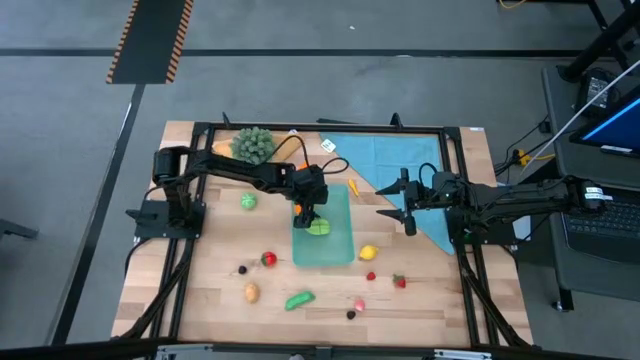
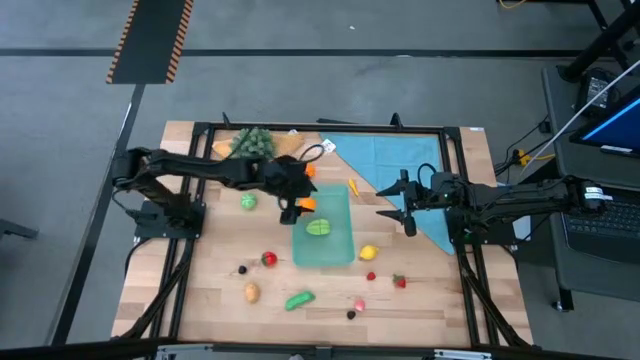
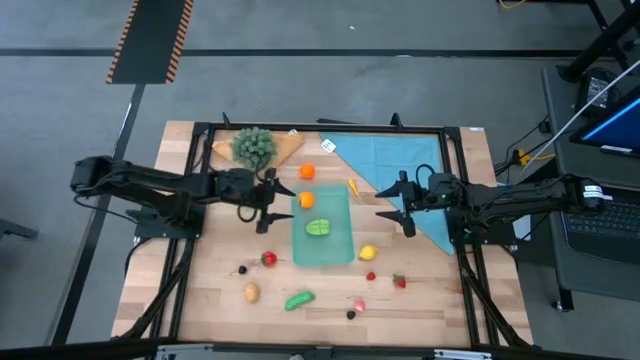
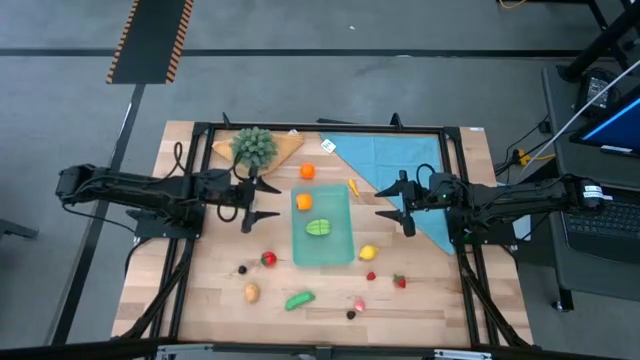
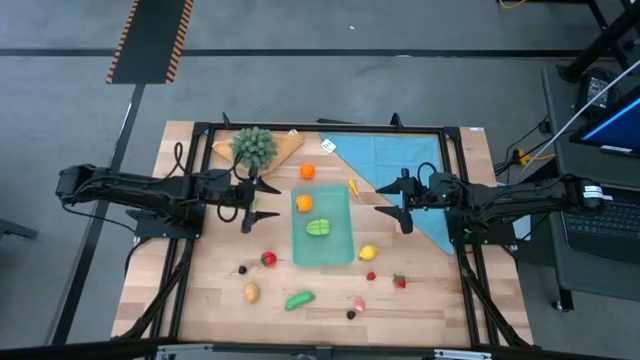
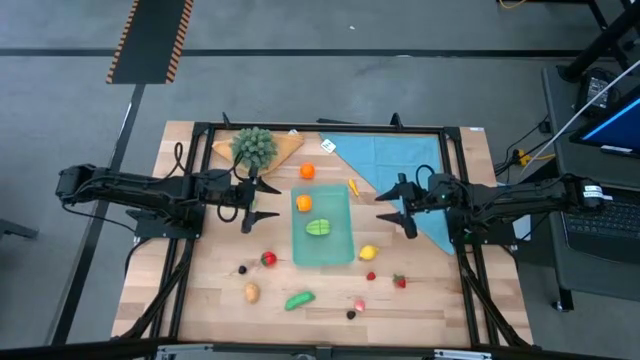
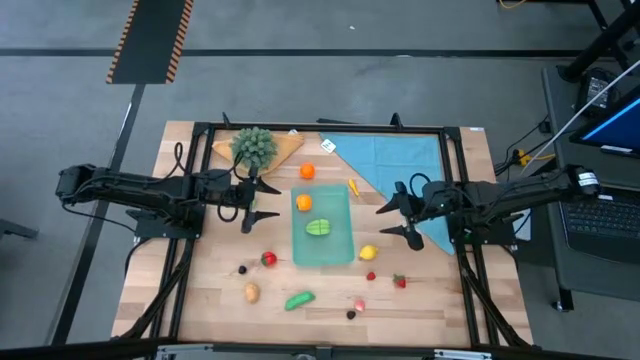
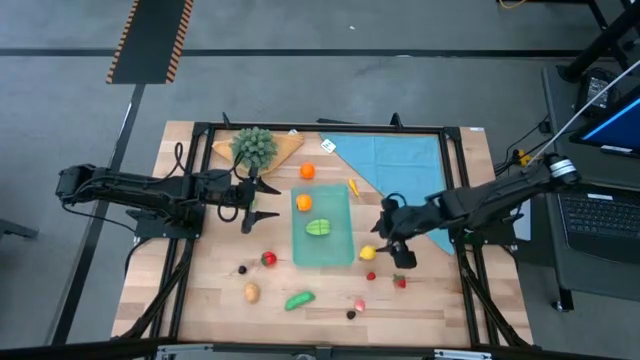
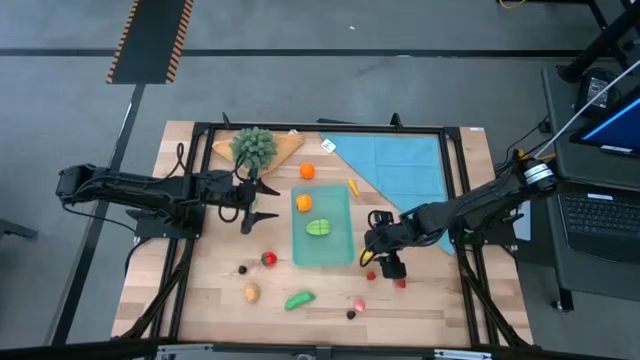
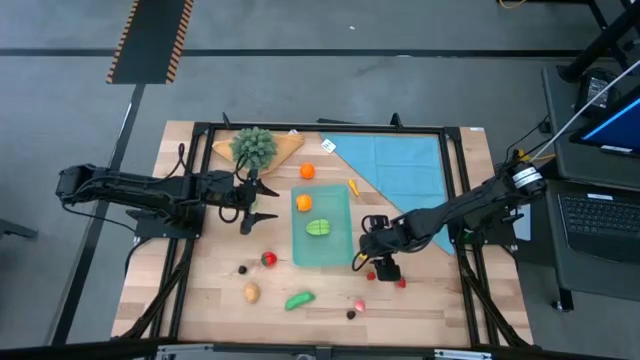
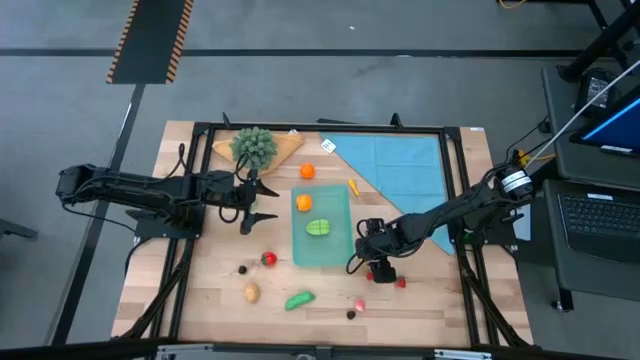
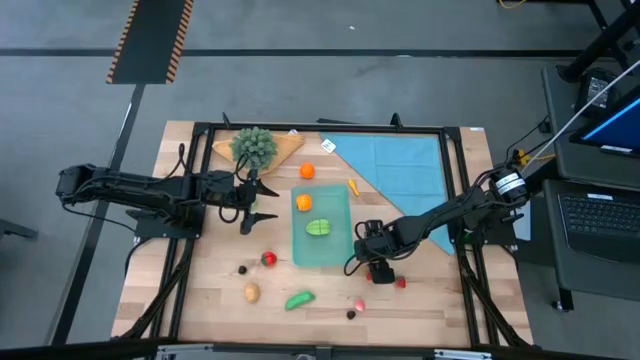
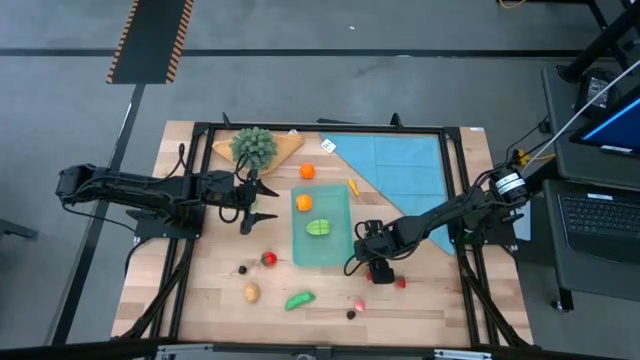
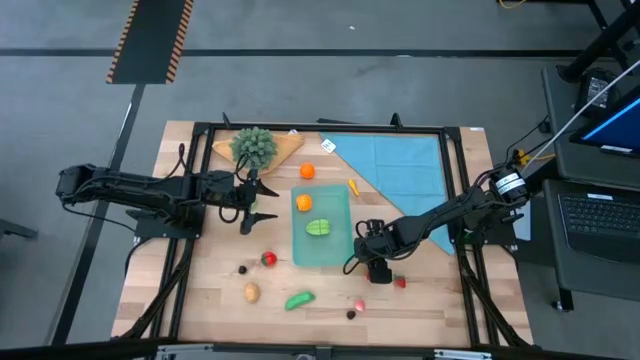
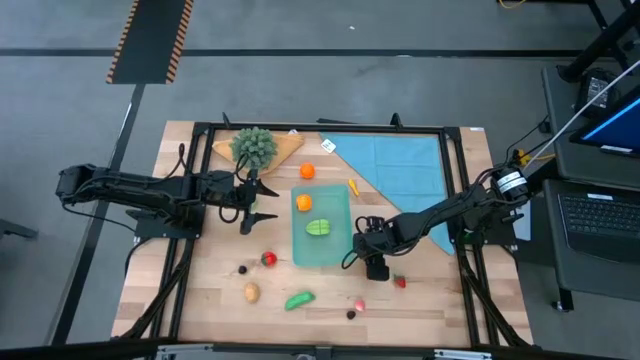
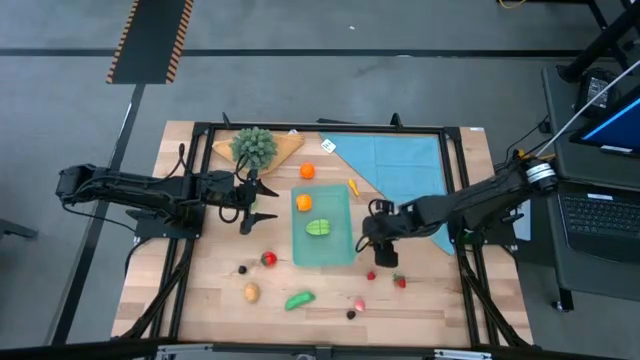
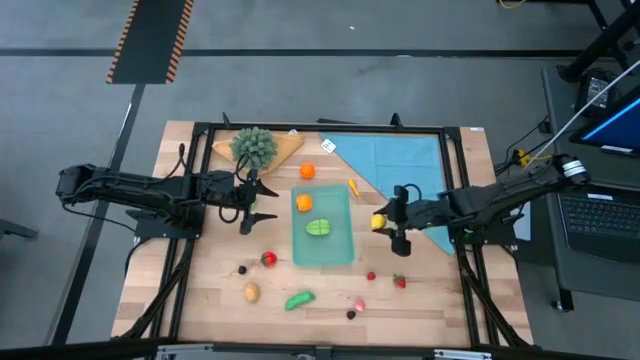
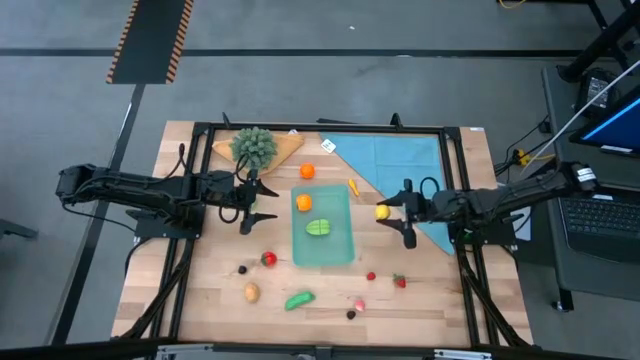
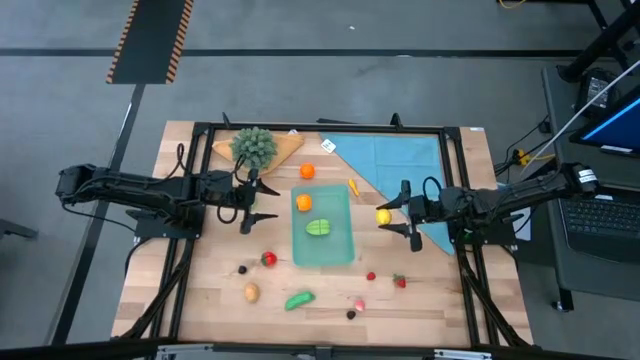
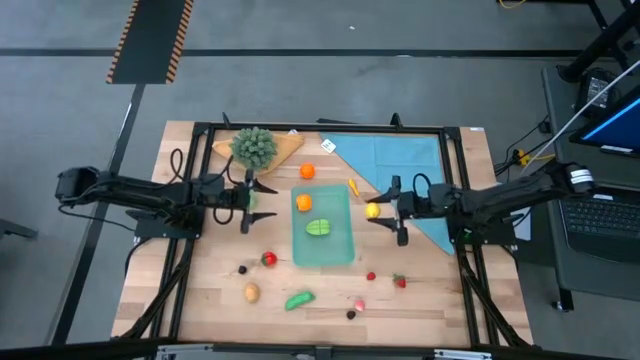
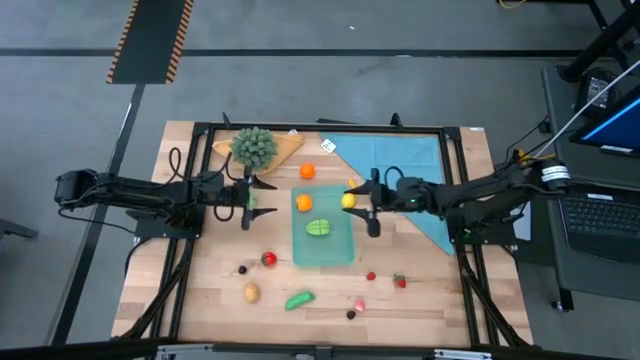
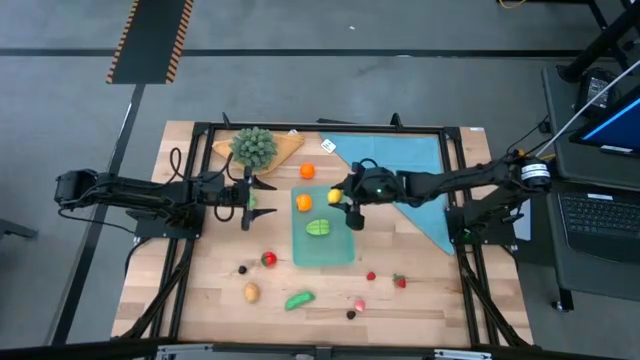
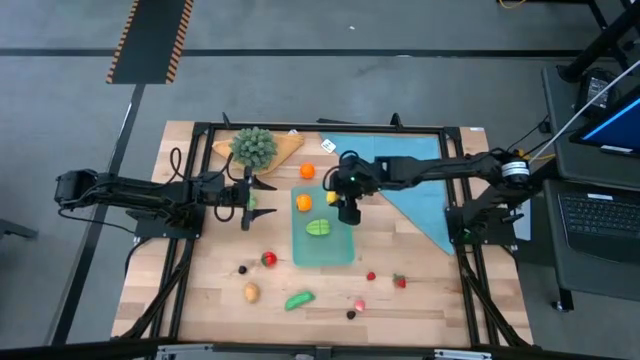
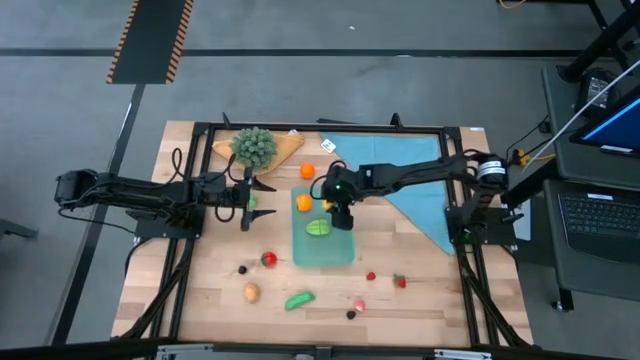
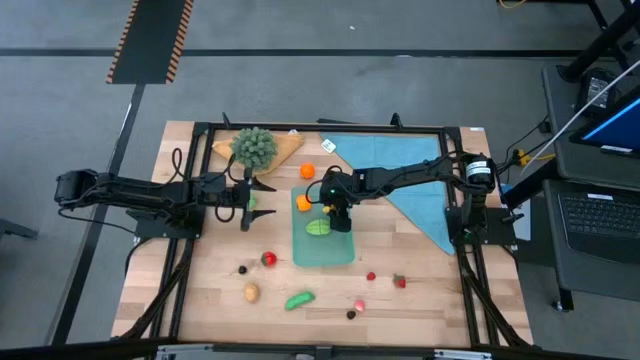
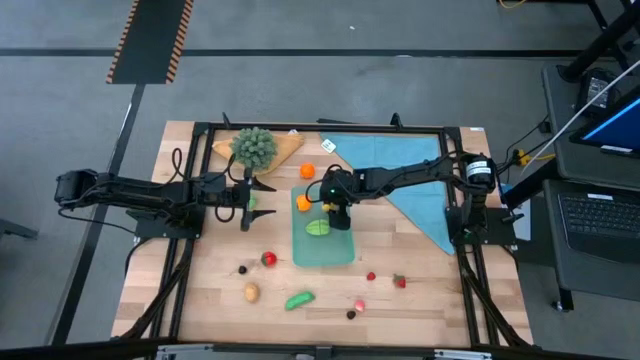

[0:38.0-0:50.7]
Task: Pick and placing Produce into tupperware
Put the lemon into the bin

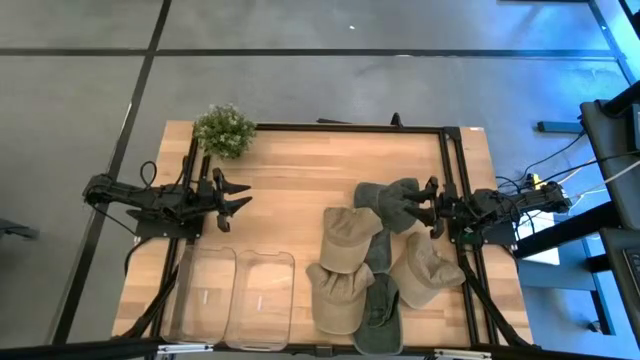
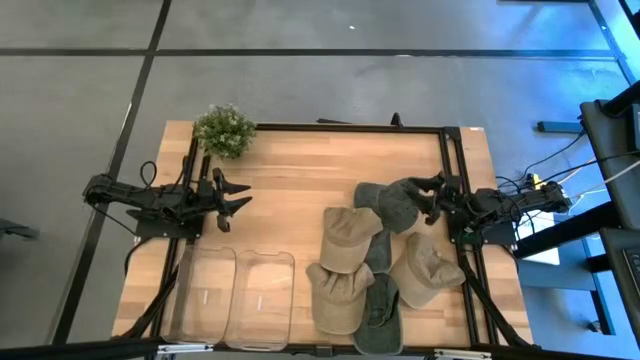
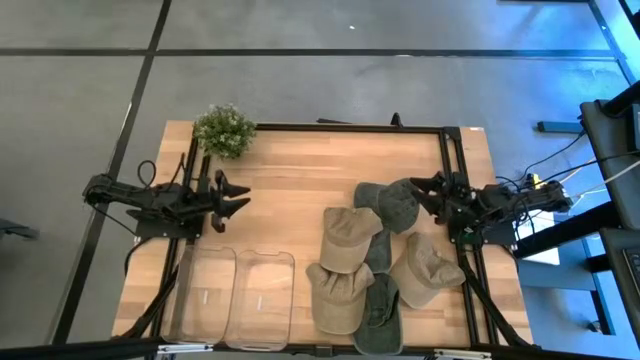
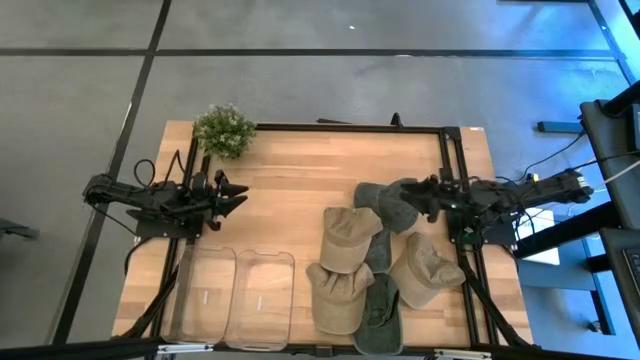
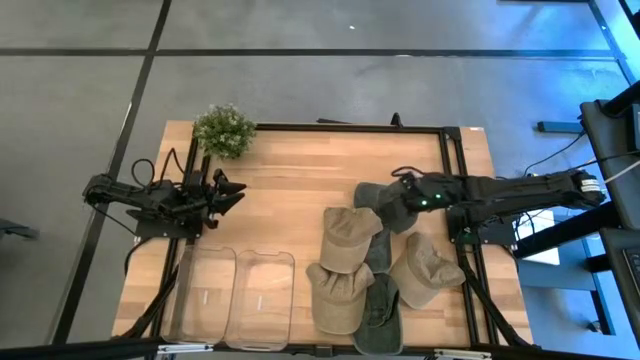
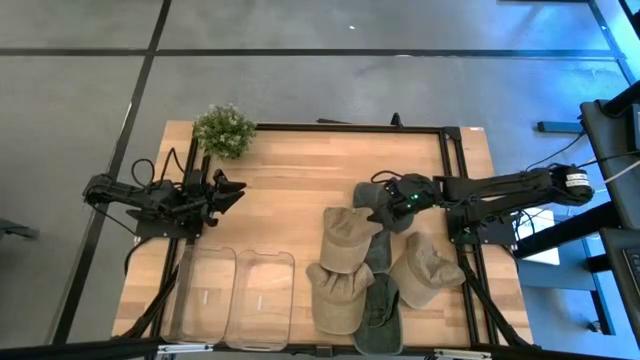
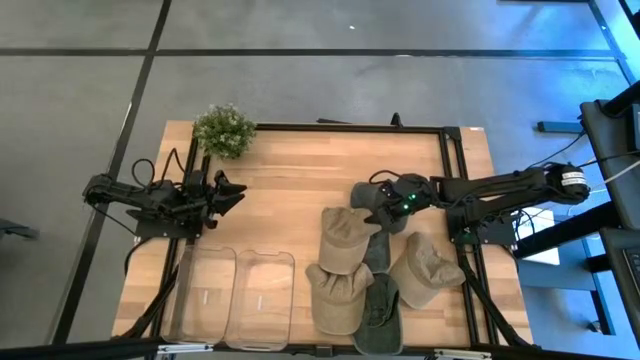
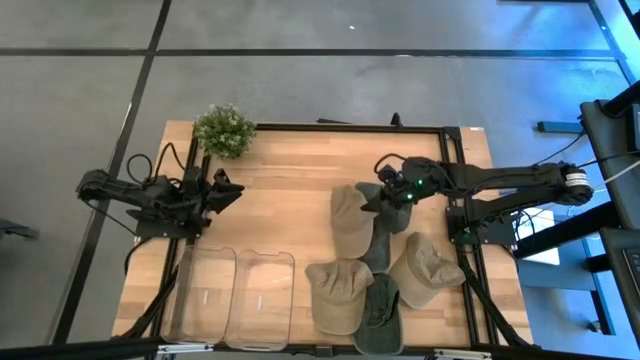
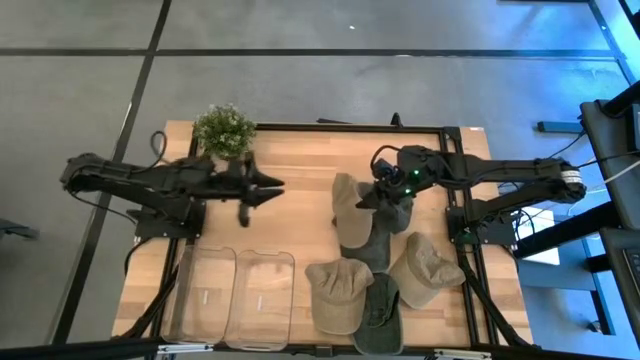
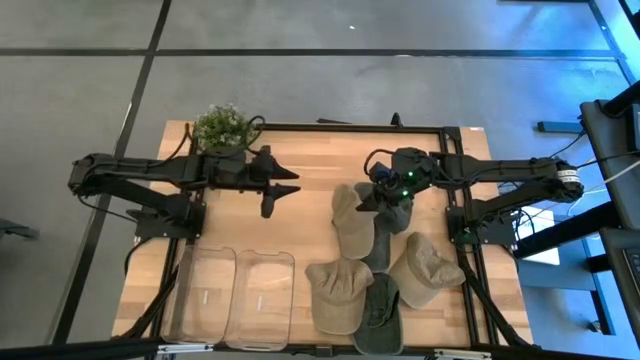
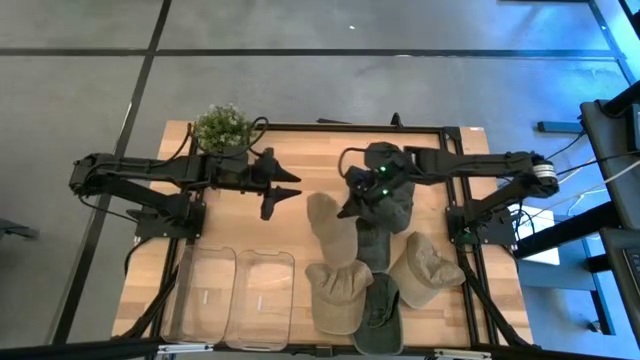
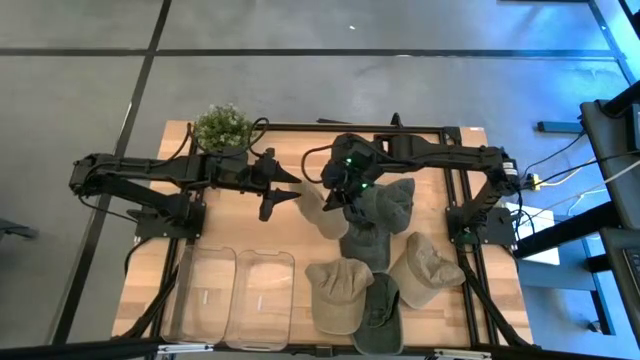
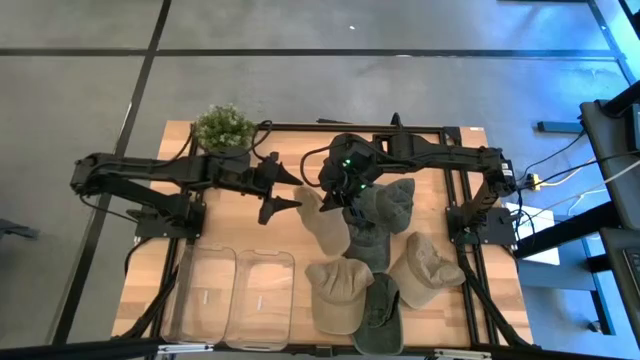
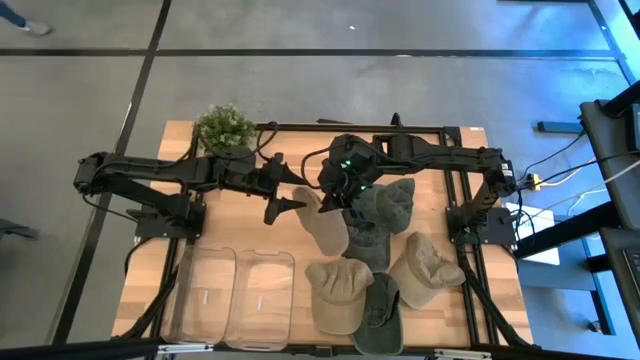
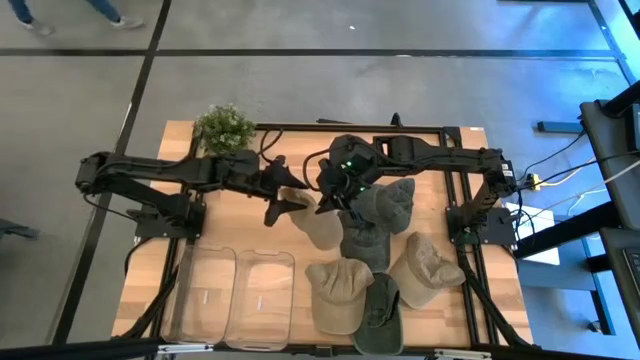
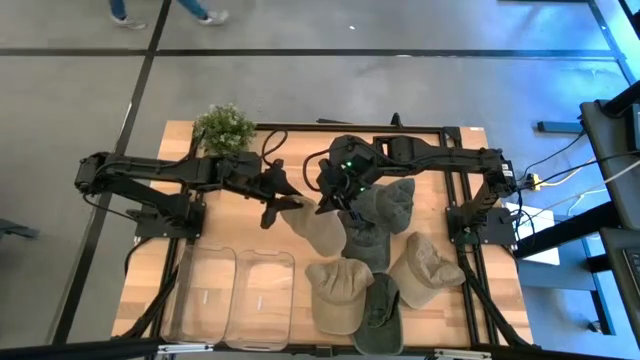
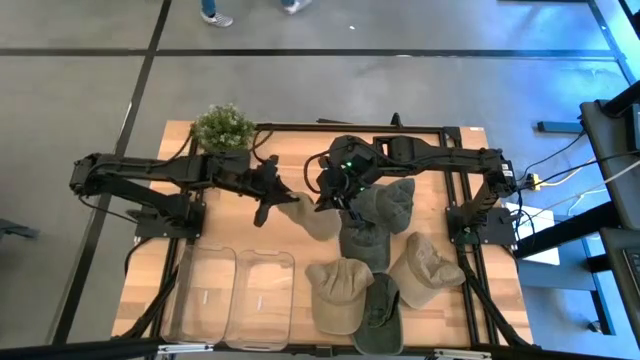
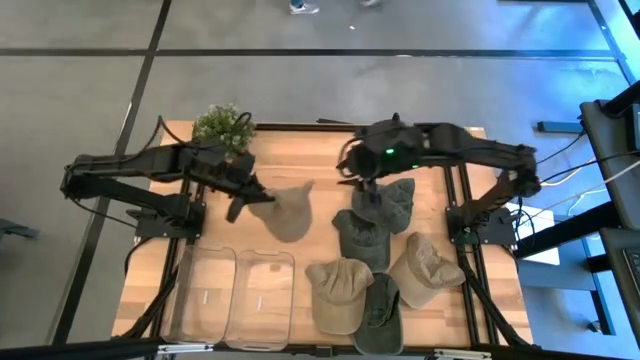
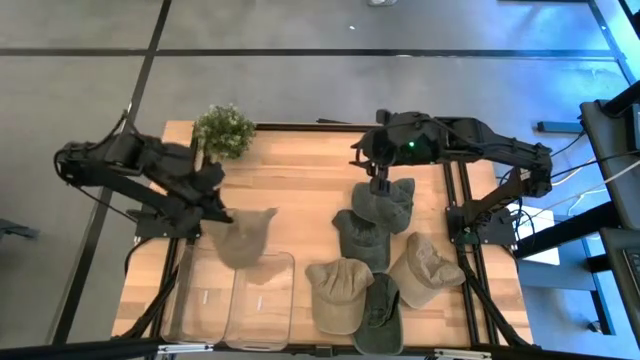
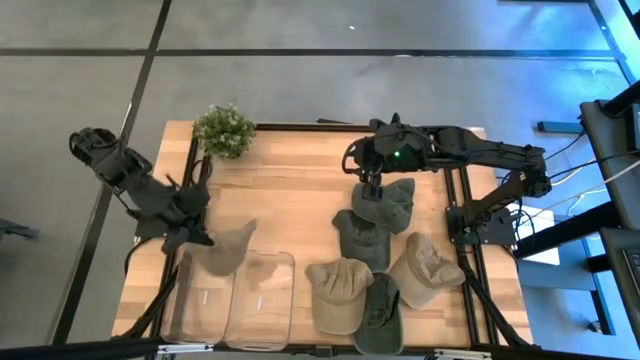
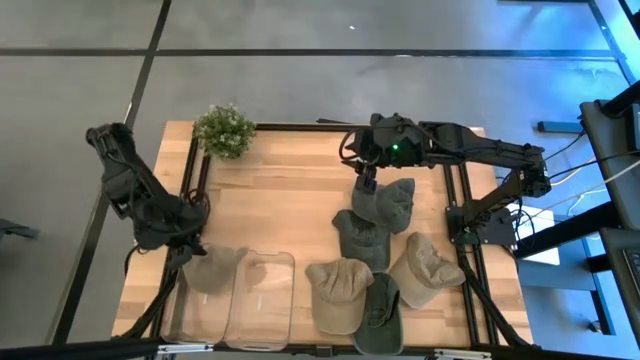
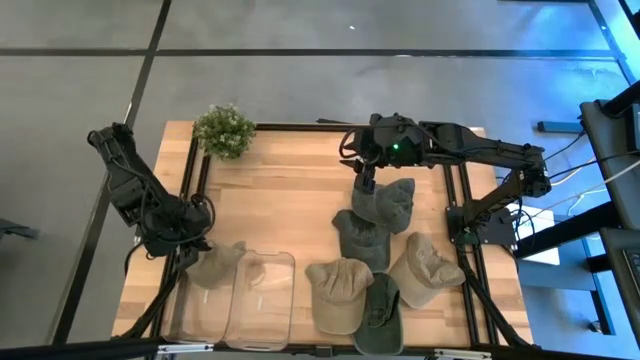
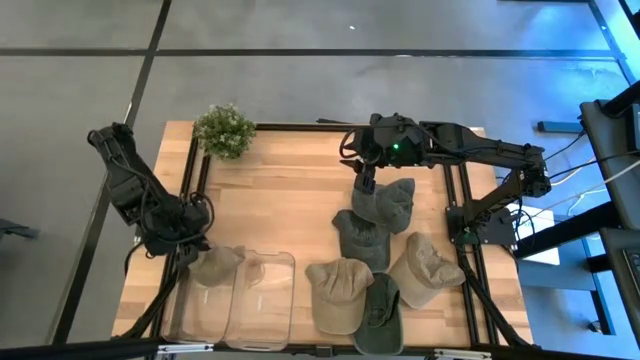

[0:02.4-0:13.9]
Task: Pick & Place hat
Put the top brown cap into the left transparent bin
